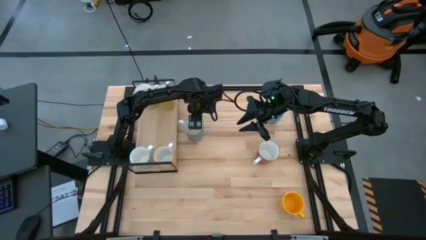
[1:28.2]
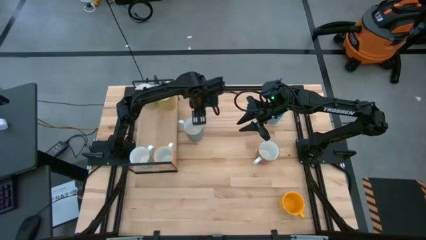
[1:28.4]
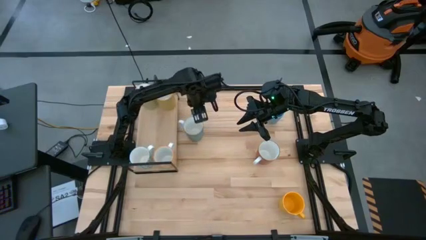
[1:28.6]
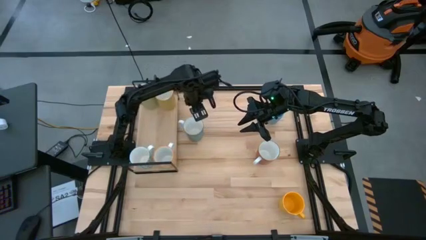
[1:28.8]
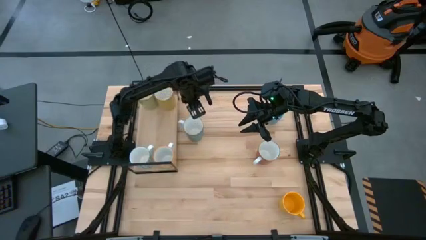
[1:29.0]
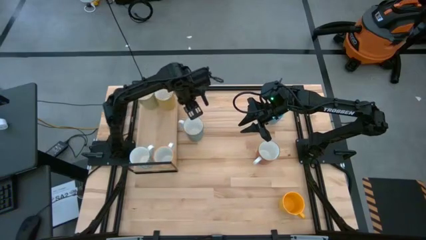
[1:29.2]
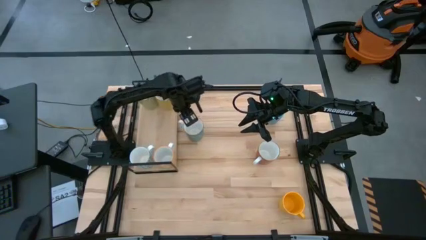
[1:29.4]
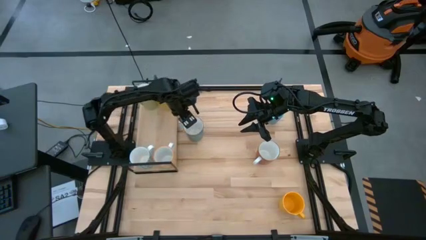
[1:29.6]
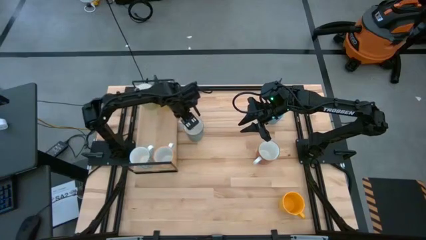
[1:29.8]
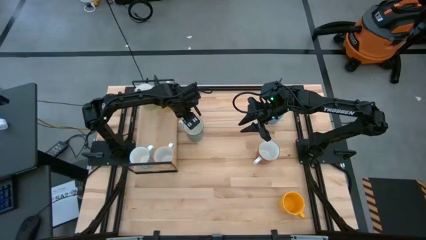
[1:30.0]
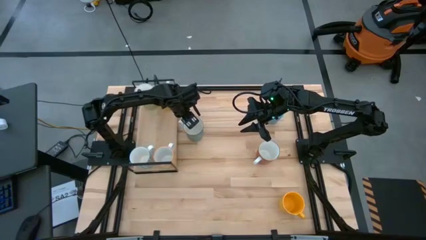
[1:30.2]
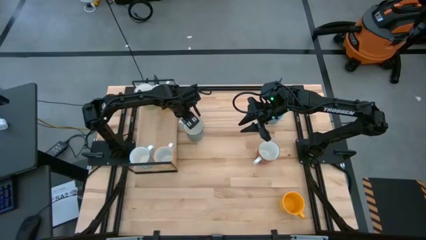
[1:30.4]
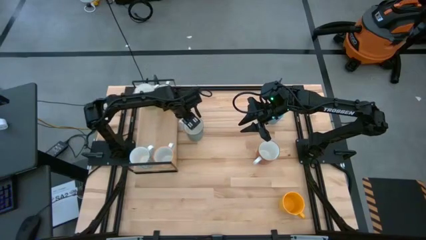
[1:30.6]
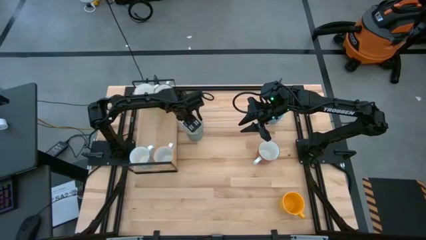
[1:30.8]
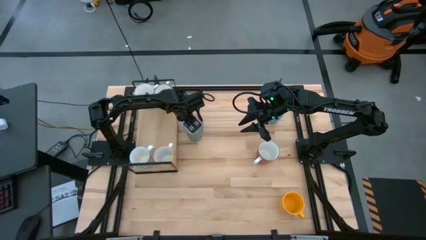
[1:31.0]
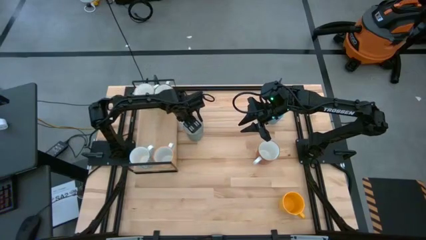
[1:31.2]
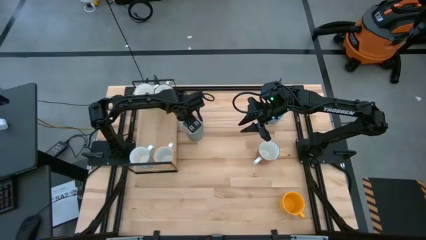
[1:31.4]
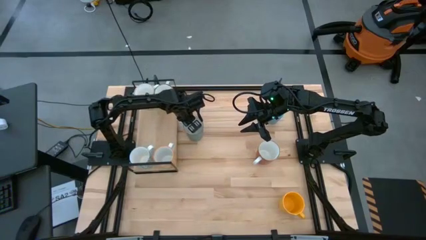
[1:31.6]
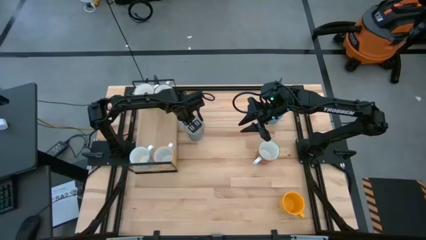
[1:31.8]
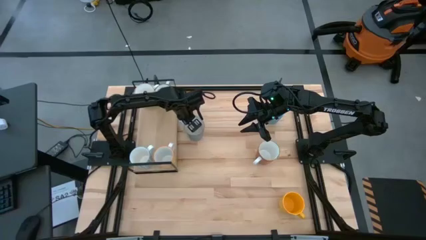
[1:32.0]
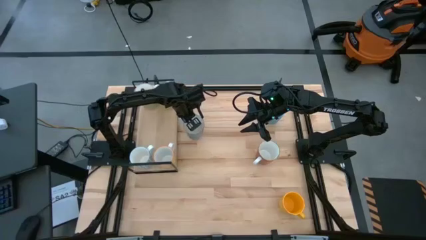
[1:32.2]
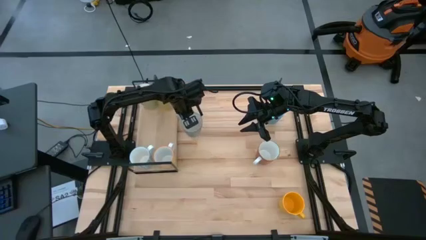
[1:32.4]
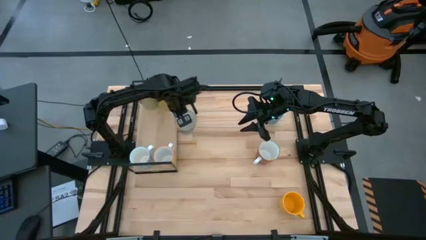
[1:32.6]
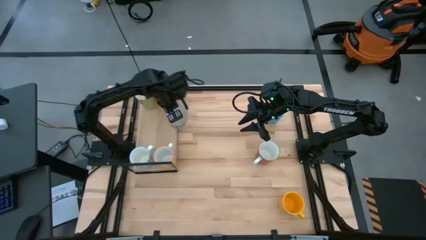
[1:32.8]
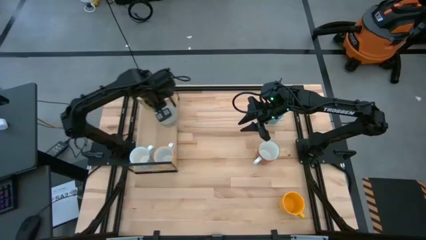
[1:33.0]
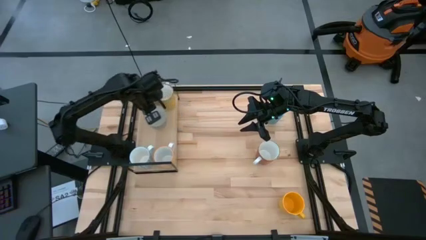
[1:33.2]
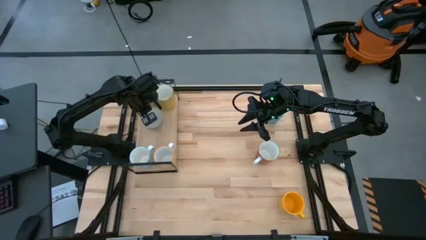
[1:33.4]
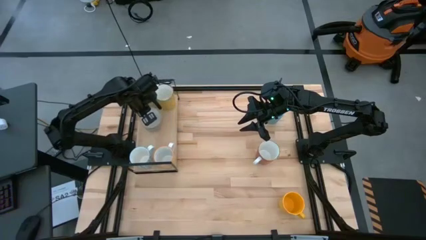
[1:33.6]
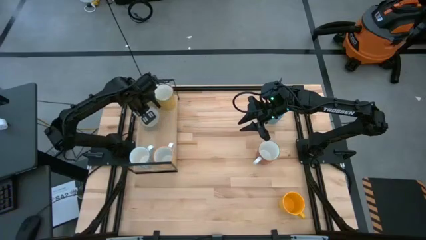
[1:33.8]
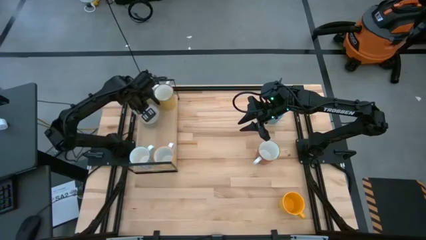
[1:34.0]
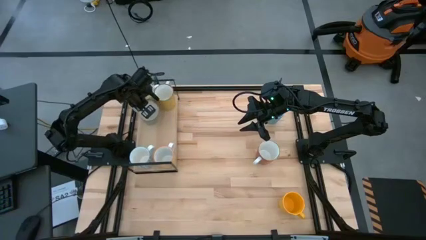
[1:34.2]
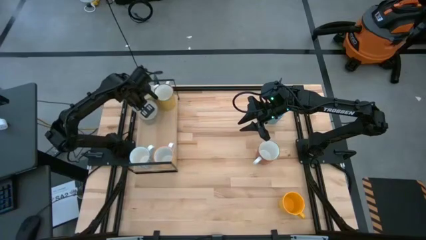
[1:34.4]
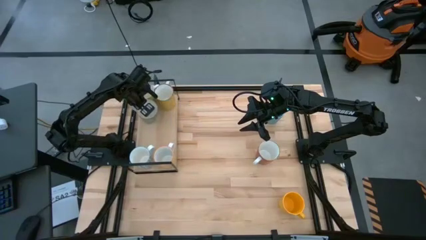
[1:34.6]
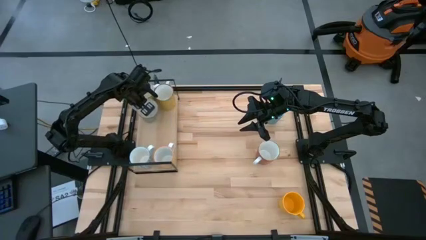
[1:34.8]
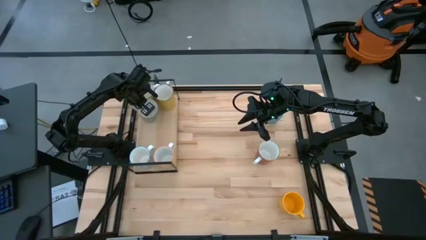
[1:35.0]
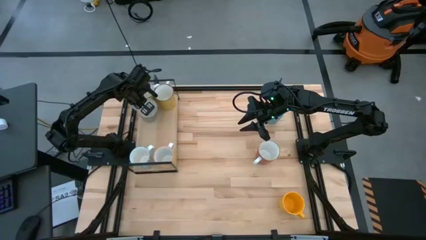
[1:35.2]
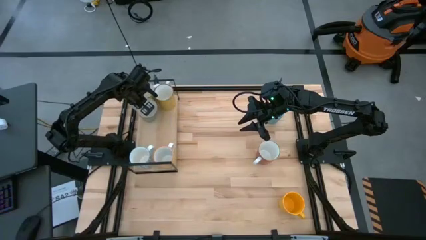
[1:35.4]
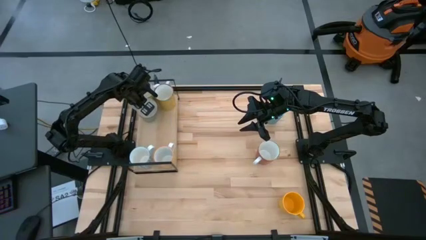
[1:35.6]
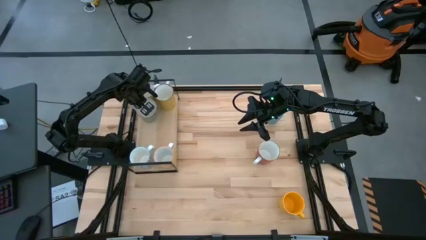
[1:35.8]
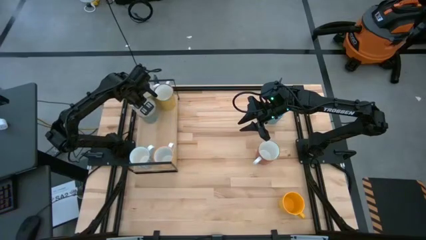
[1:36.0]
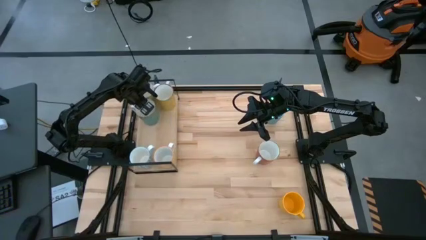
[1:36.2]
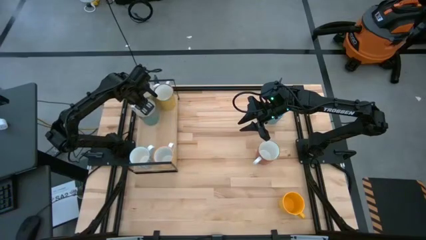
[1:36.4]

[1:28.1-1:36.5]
Task: Place coffee mugs
Put the light blue mug on the shelf

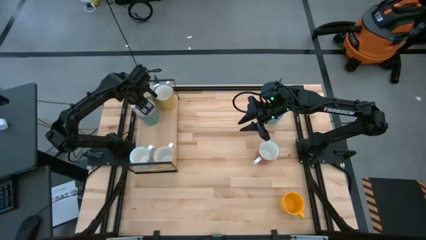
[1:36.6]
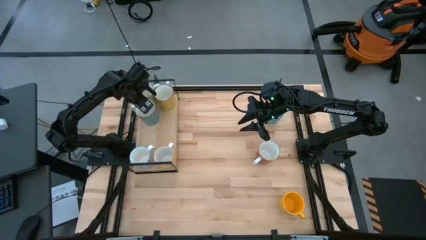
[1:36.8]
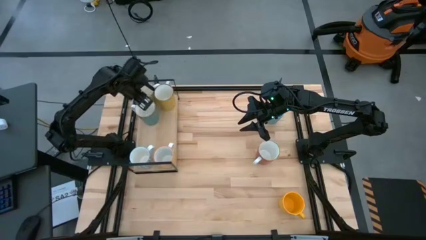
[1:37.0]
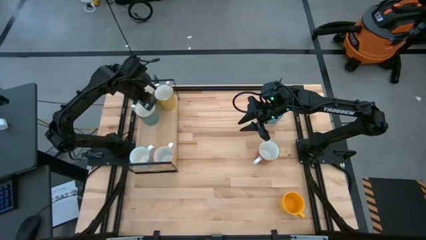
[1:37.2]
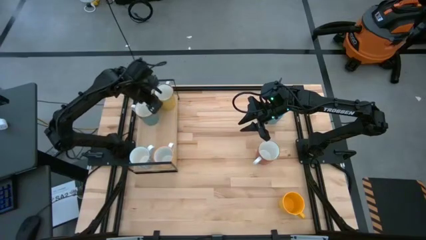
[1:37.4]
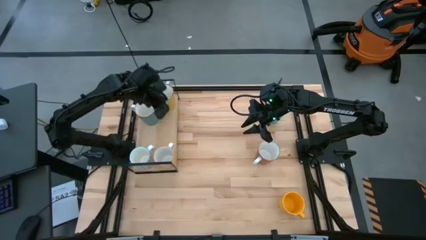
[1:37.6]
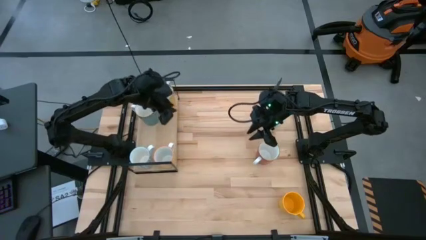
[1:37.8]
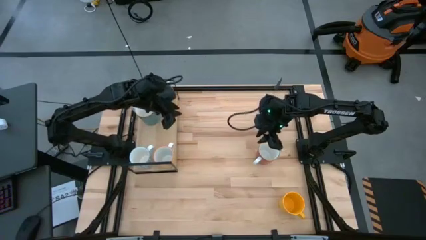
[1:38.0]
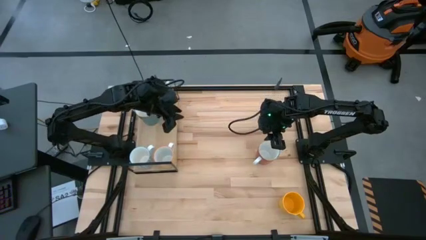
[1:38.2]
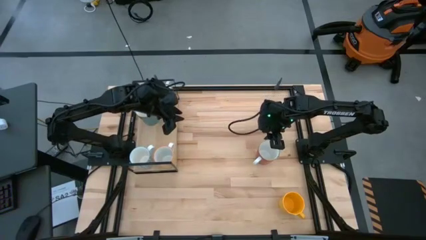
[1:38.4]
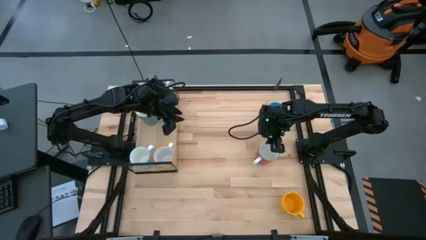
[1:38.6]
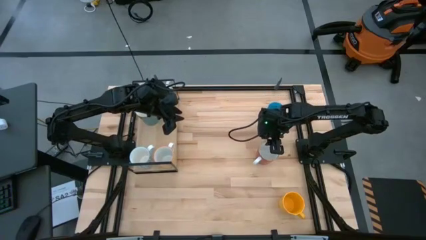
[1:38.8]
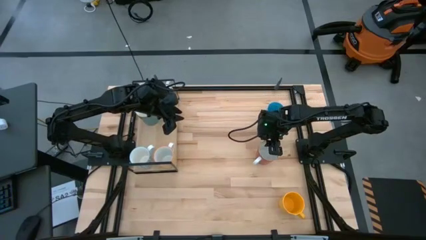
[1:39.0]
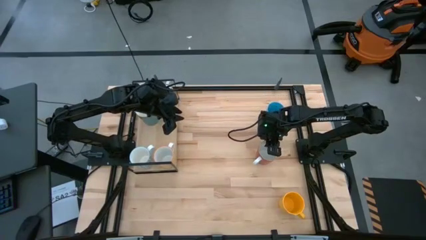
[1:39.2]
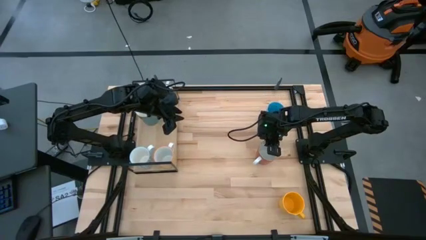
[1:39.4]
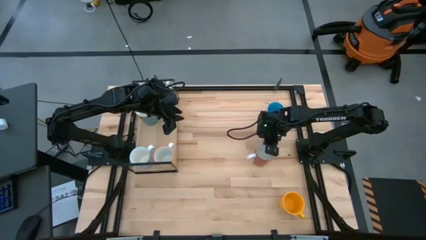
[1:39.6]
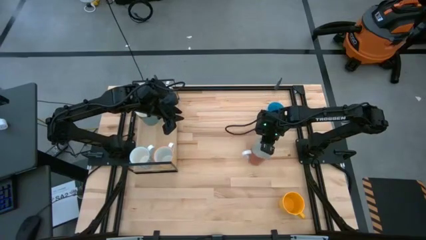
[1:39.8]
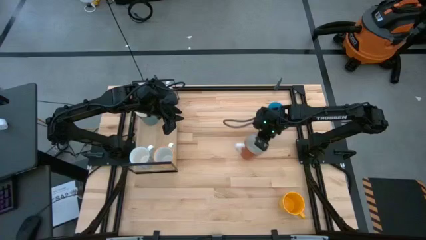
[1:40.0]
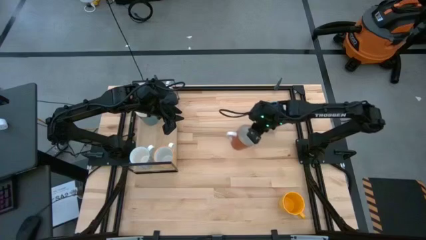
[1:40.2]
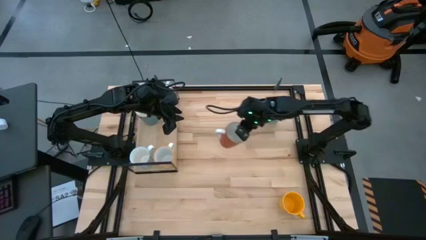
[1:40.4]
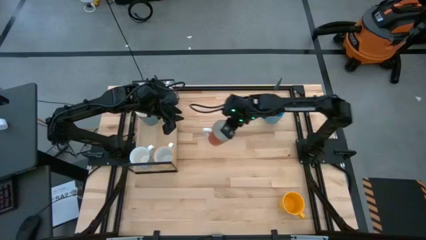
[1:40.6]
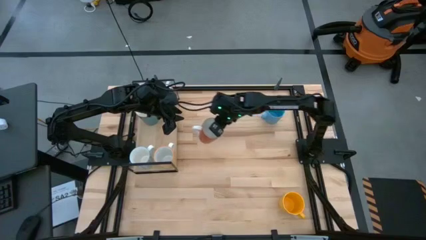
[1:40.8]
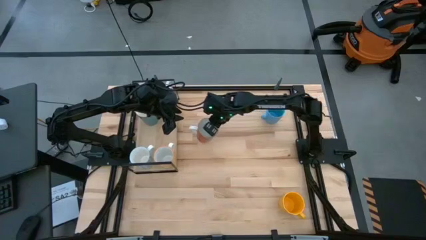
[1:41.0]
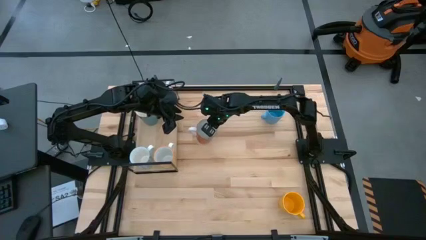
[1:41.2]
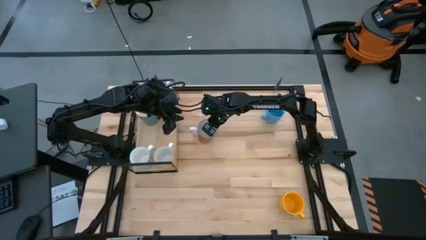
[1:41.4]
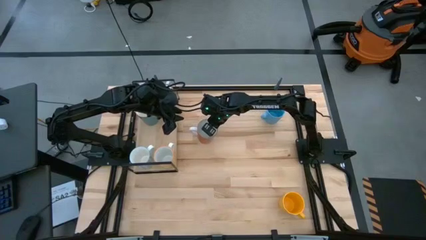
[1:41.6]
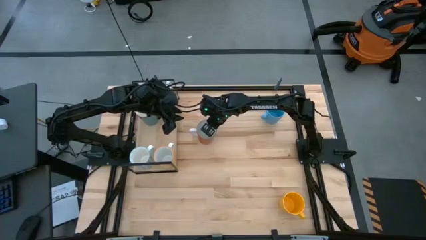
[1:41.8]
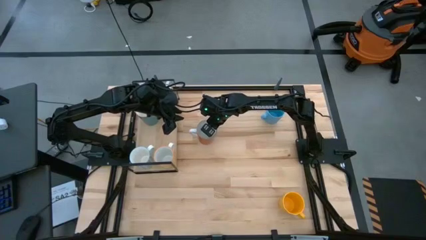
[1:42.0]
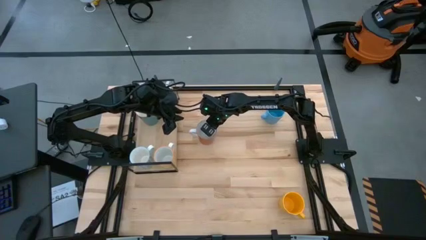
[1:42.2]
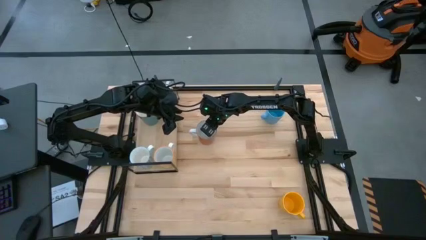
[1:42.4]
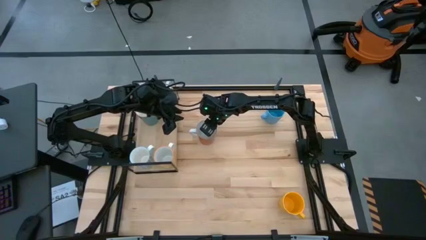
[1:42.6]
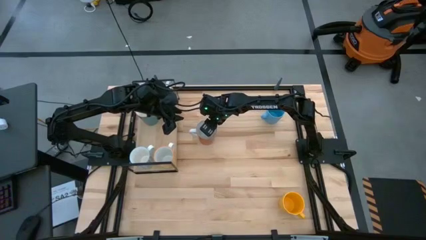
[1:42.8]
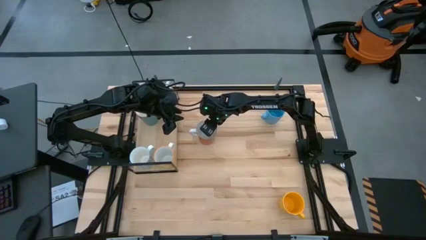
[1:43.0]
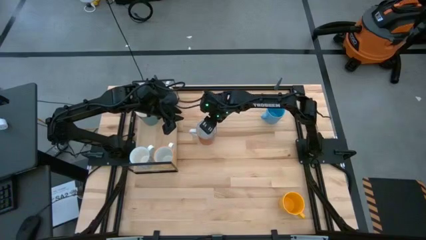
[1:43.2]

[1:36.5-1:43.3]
Move the red mug to the center of the table

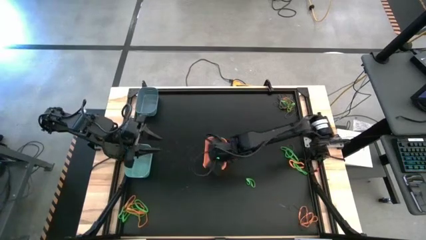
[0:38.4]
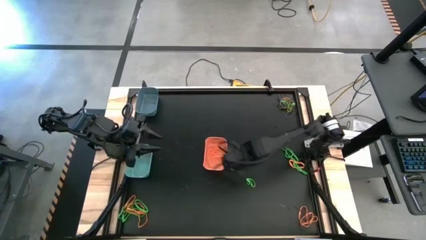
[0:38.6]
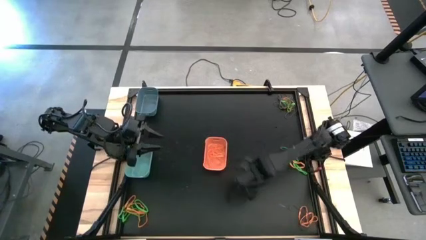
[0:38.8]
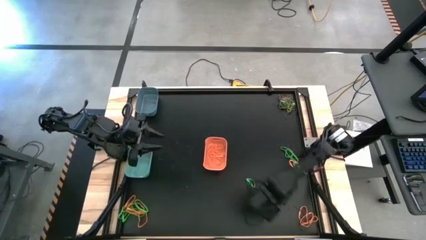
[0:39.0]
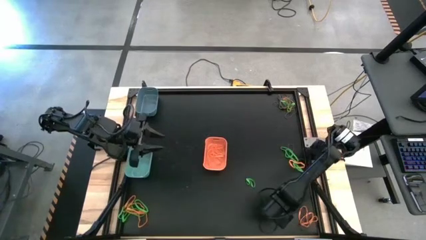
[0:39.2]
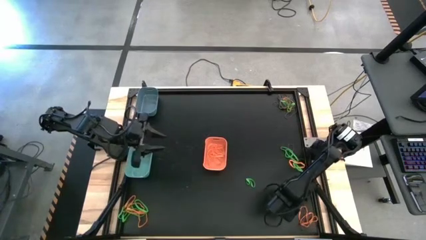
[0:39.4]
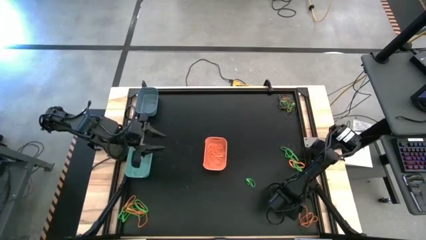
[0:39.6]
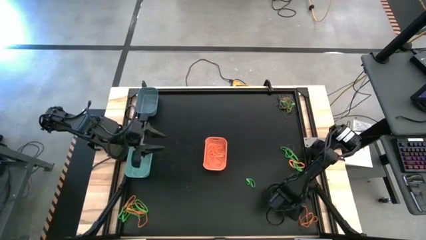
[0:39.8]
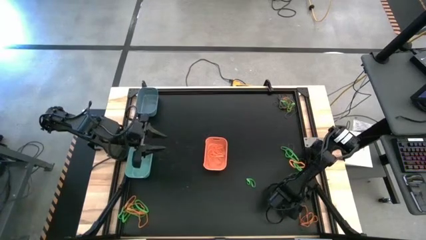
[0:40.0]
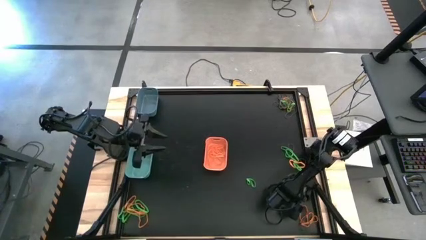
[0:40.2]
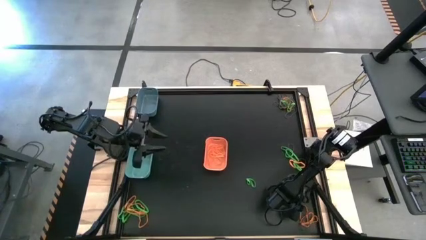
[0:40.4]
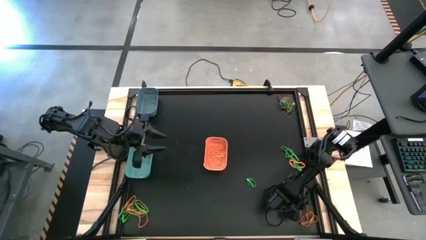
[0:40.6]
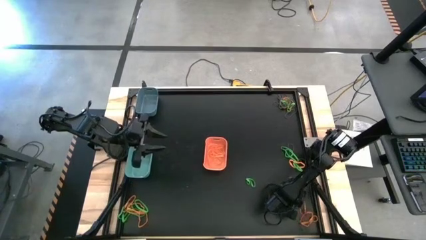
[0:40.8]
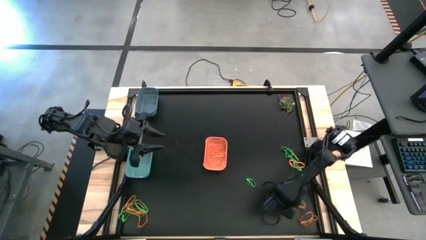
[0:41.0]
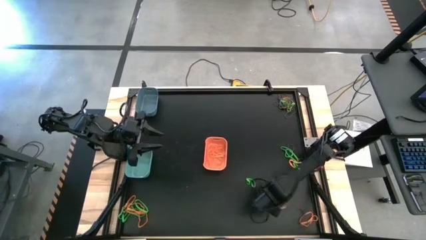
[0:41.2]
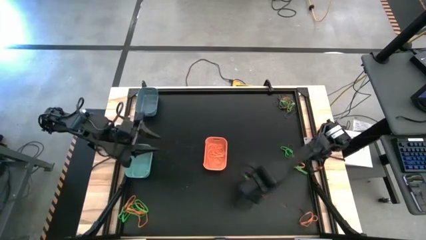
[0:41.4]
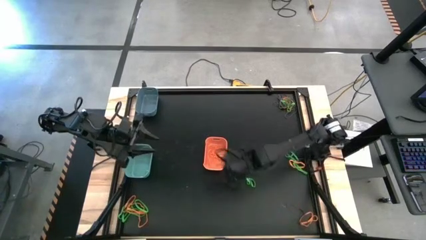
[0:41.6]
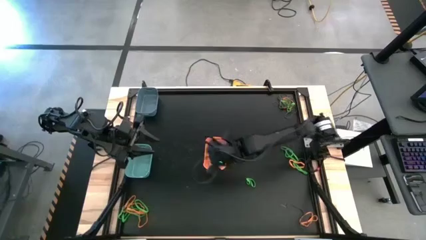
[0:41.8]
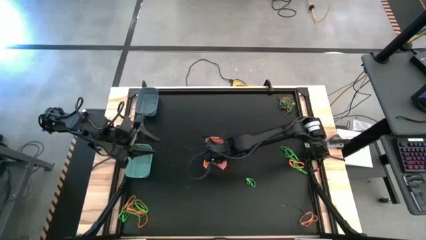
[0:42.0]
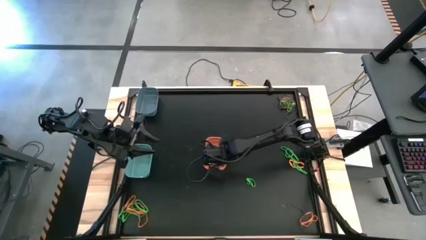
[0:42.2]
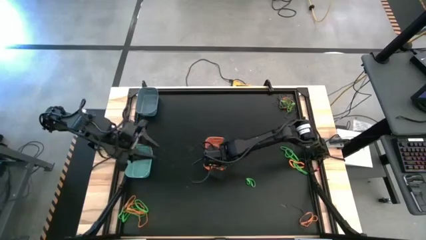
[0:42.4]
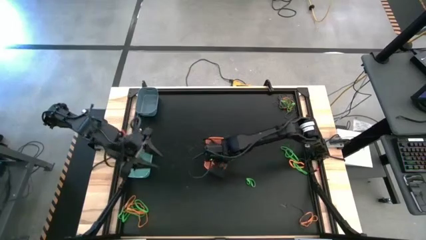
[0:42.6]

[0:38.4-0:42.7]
Task: Sort rubber bands into baskets
Put the orange rubber band into the orange bin
